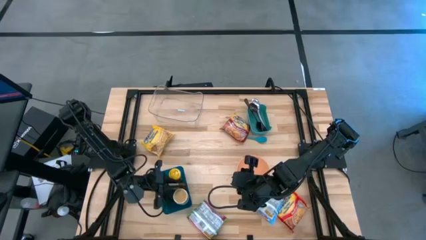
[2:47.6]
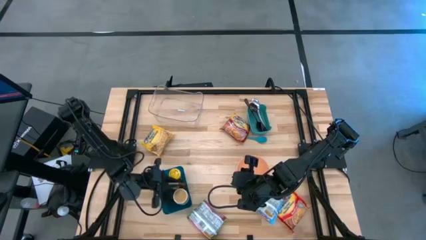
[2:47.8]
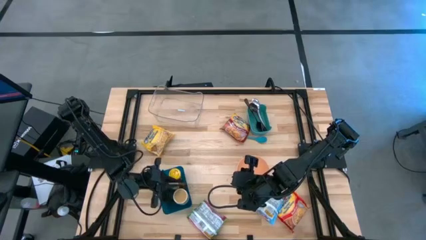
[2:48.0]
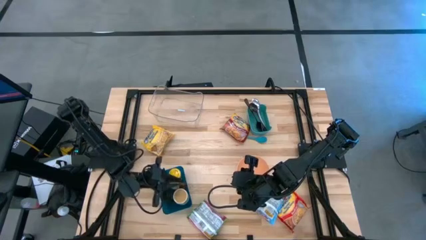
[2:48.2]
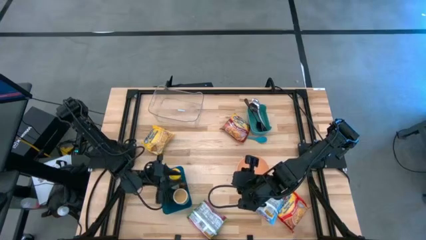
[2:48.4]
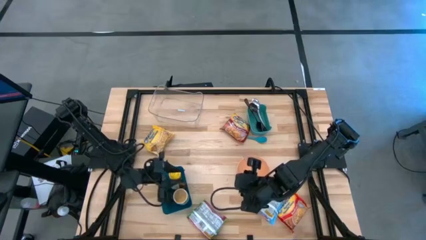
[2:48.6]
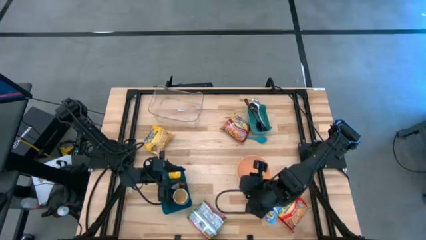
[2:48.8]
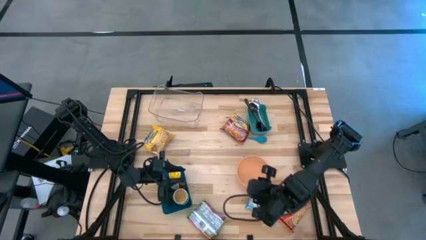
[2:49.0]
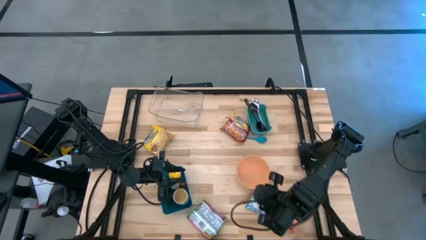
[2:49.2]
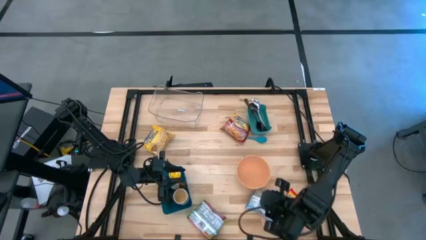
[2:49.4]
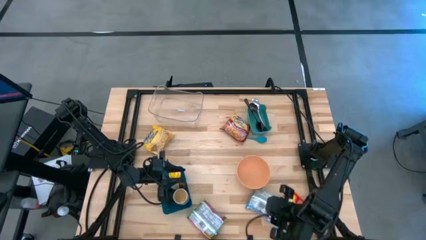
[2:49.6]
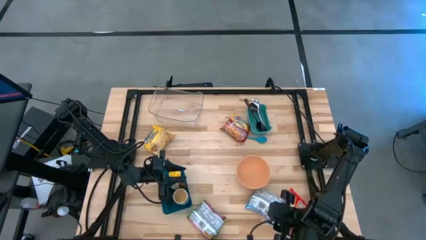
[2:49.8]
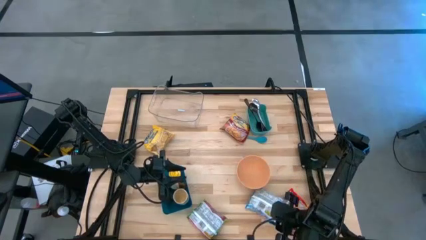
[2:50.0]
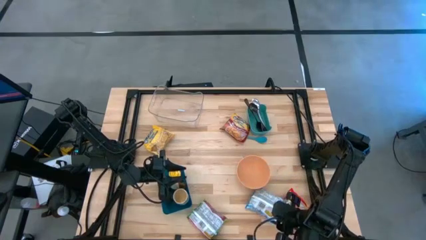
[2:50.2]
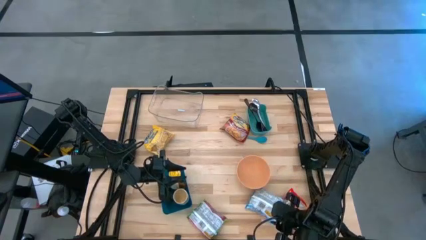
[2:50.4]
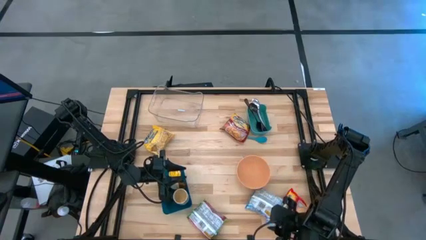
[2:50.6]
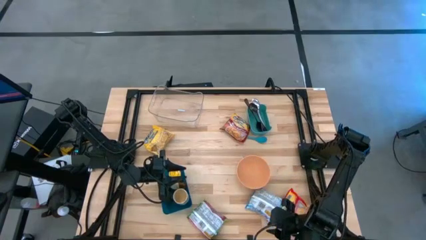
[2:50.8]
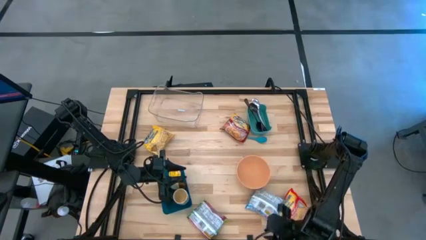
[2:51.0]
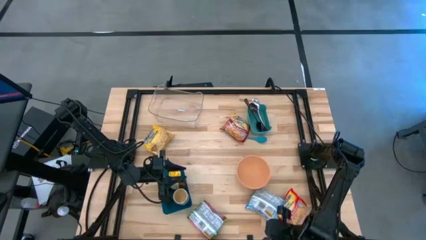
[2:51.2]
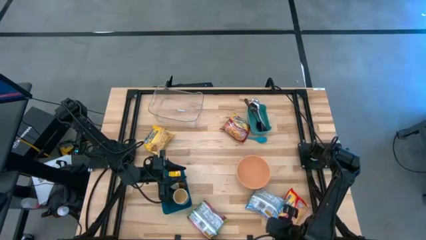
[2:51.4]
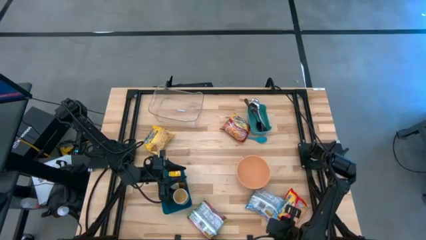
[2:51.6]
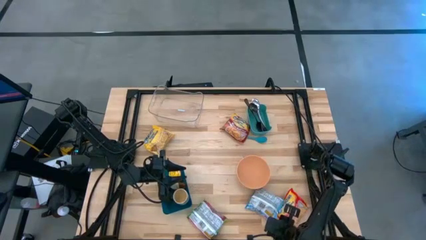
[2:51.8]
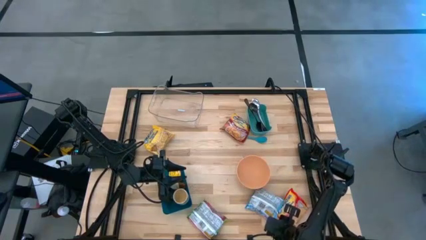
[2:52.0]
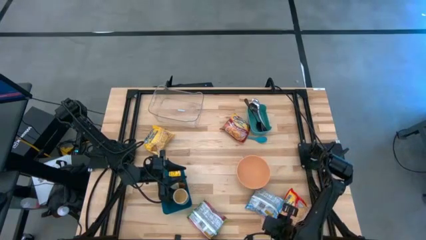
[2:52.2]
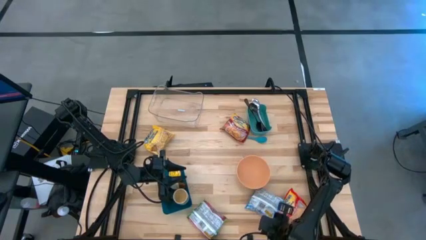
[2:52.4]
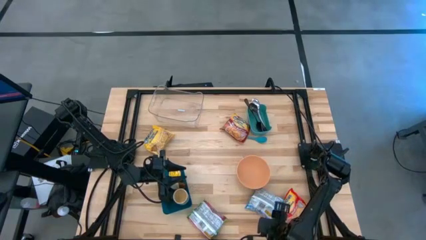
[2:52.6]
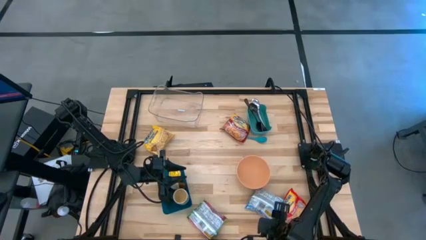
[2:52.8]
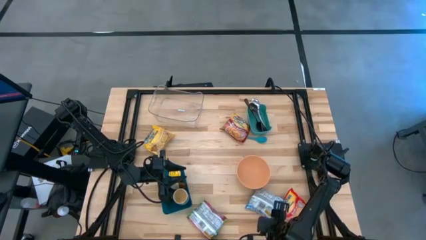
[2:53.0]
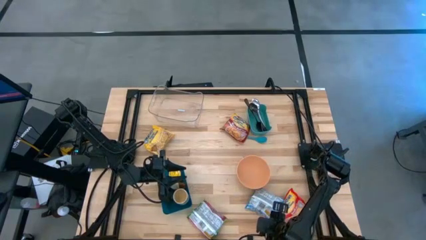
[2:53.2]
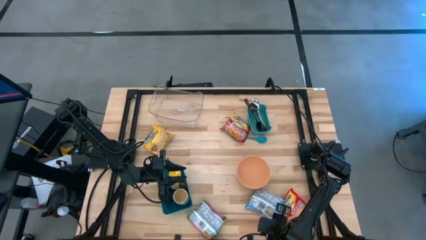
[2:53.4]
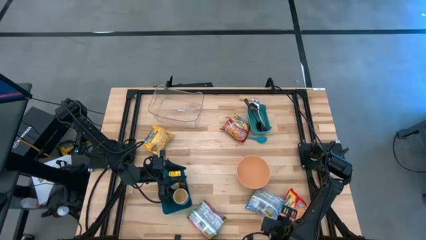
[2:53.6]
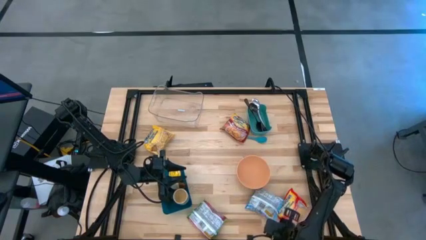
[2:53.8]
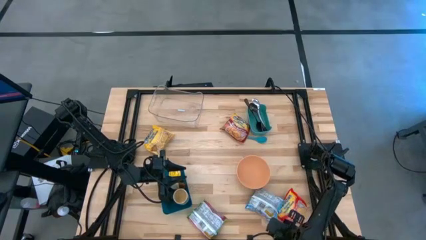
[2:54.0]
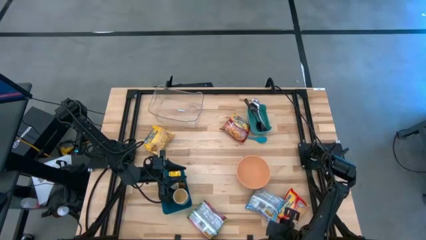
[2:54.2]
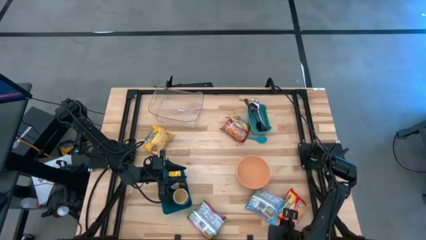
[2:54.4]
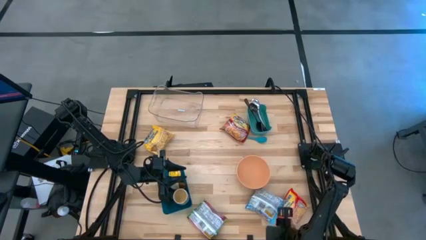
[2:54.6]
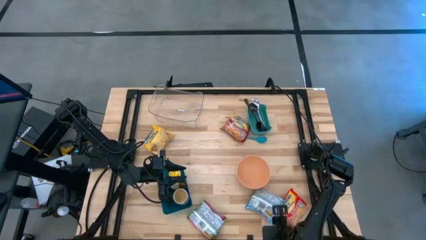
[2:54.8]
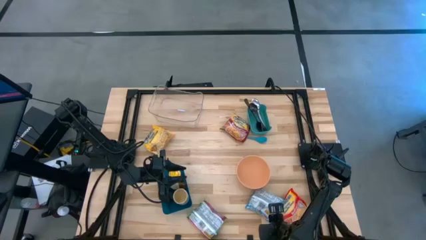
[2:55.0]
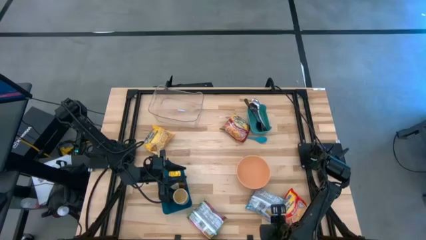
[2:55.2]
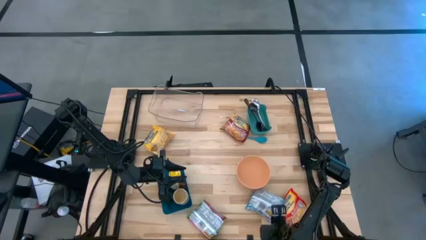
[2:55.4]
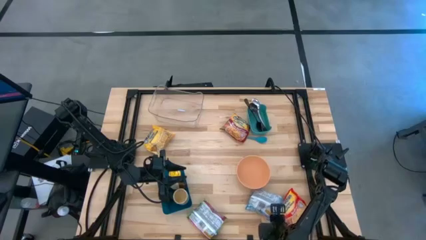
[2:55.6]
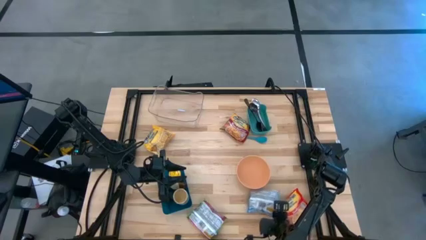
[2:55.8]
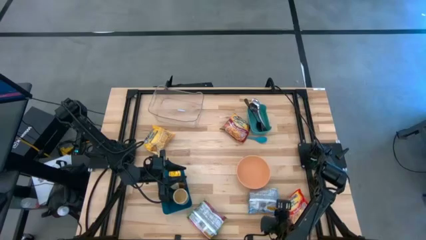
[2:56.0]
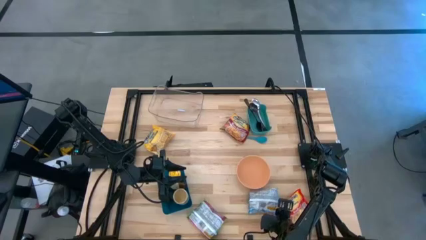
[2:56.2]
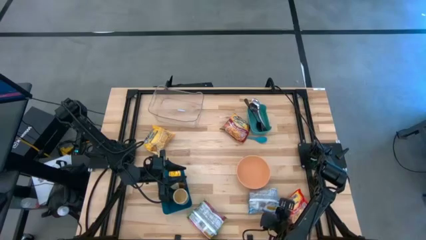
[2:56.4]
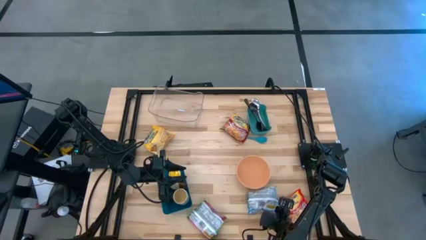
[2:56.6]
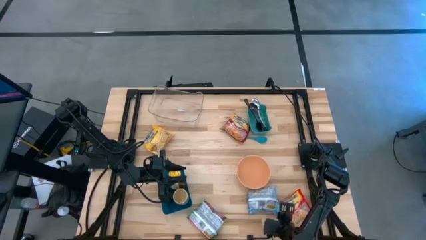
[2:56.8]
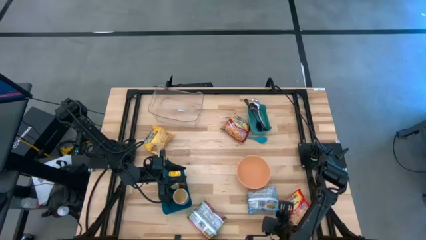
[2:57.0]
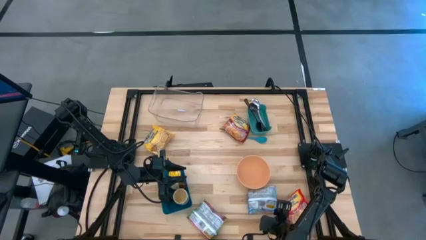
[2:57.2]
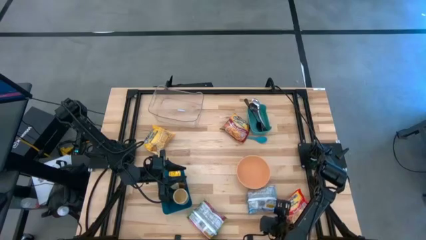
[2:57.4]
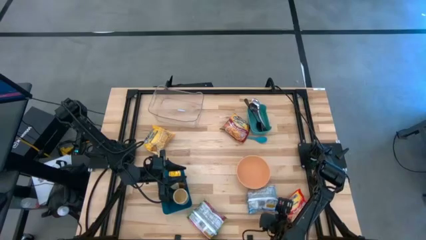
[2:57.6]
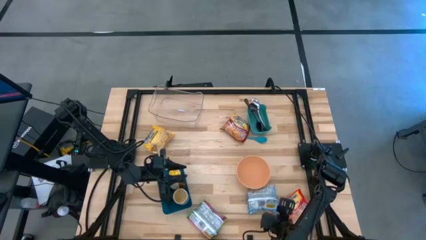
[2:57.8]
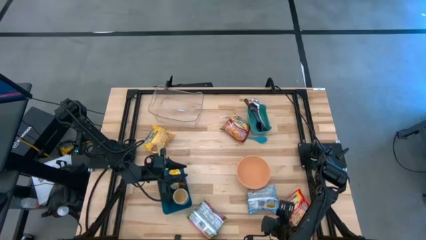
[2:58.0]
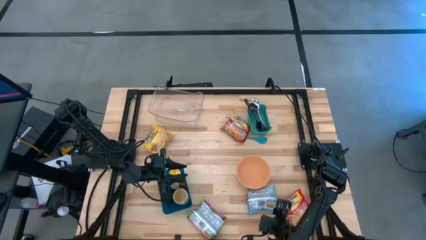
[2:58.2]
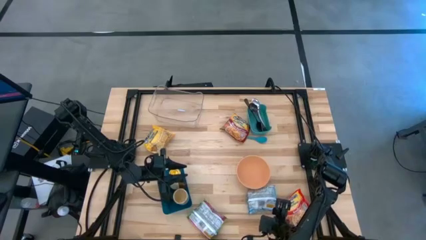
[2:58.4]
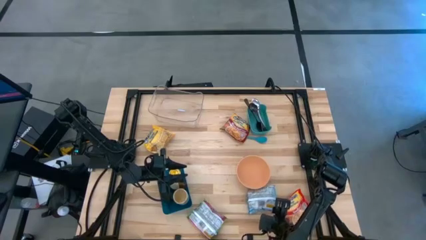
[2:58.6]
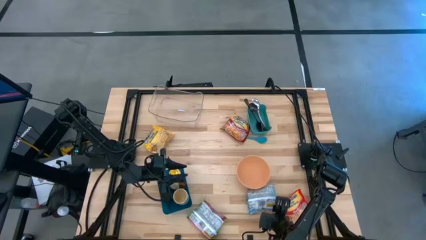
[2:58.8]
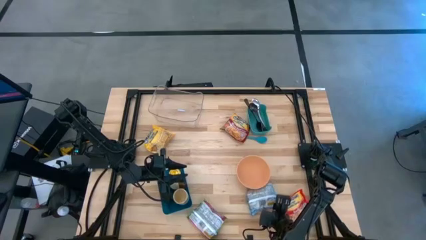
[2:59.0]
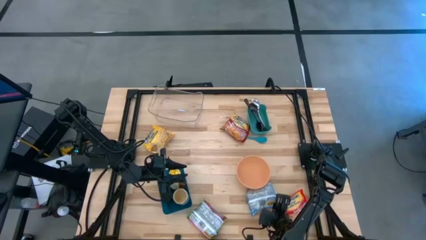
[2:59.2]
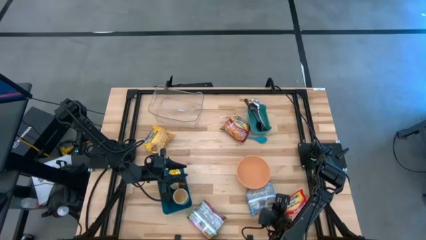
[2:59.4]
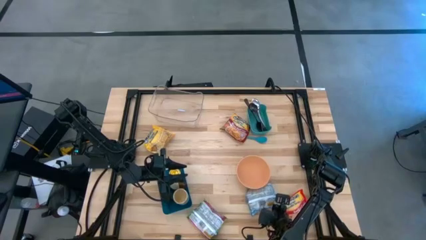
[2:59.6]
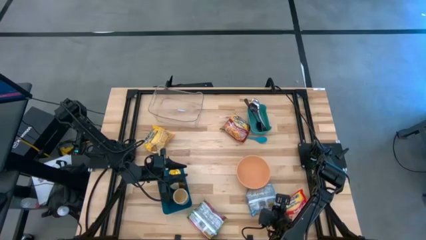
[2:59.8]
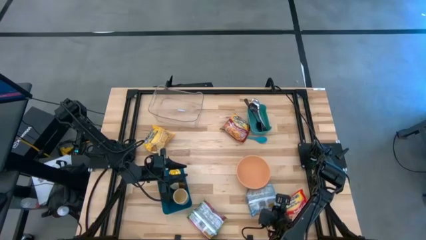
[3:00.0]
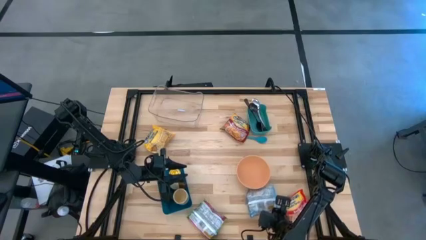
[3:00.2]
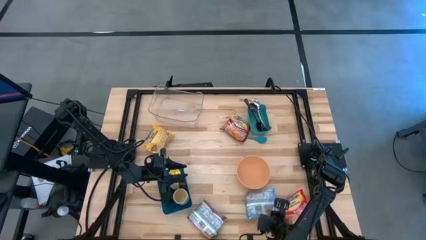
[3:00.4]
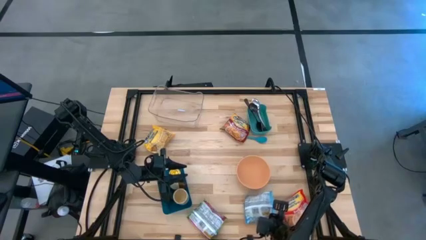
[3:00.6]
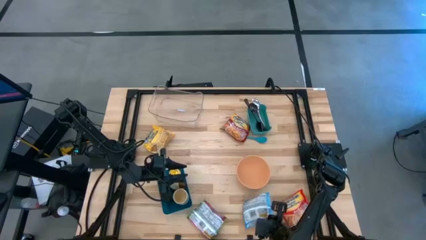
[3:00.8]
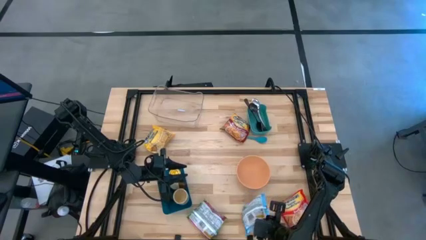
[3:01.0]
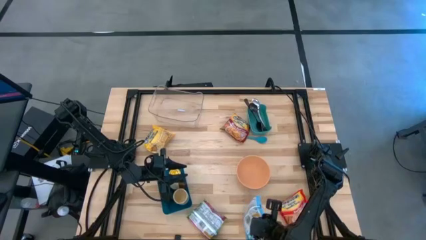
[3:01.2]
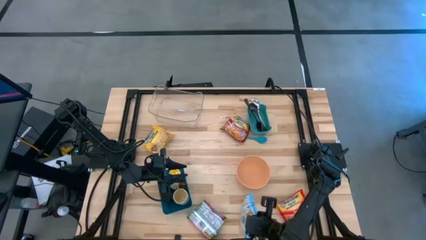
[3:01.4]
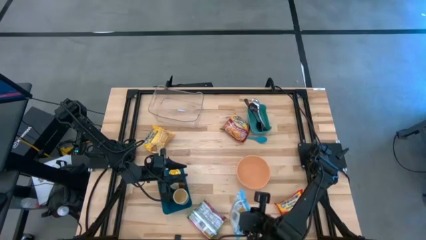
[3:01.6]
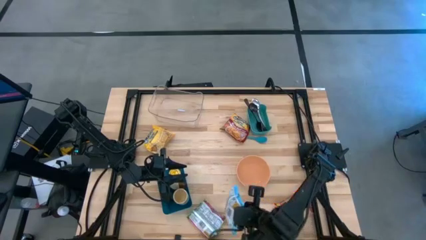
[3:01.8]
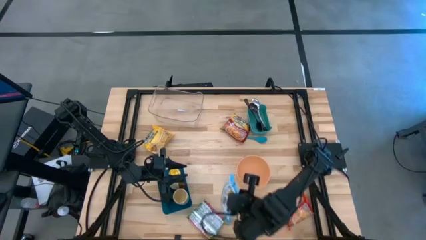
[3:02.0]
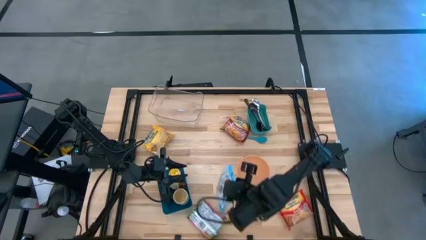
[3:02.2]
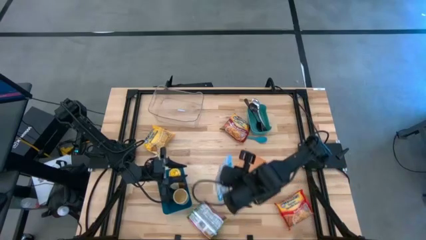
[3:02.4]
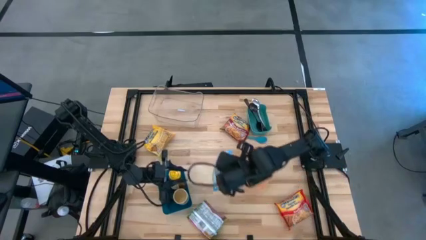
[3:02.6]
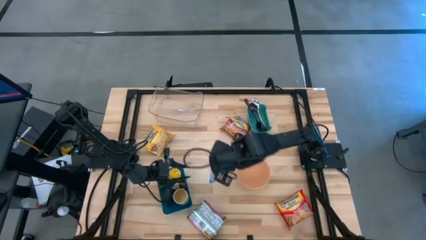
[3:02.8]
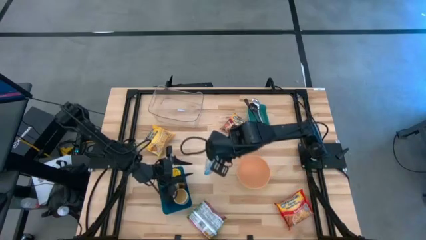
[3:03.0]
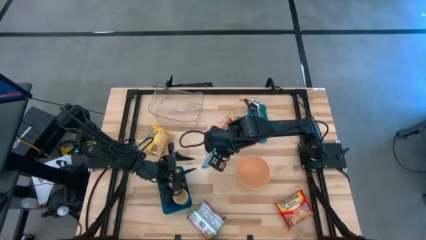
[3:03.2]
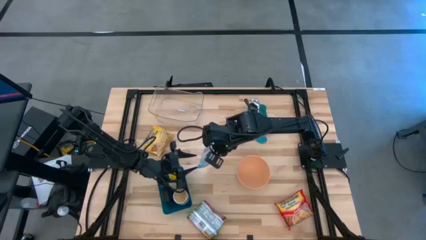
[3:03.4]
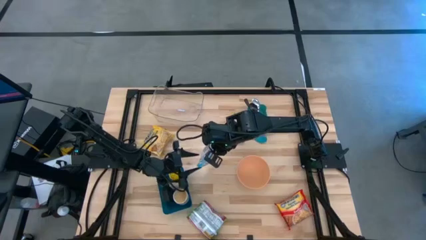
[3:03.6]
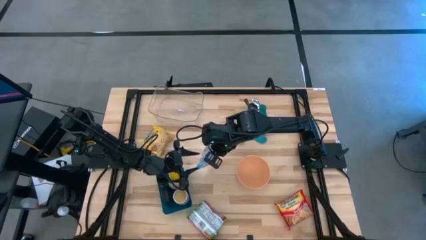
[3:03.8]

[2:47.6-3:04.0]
Task: Pick & Place Food Item
Put the light blue noodle pack into the transparent bin
